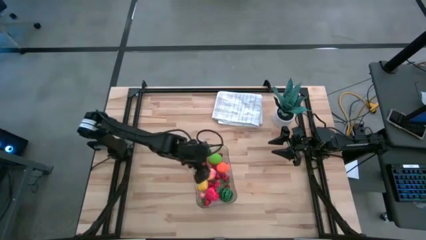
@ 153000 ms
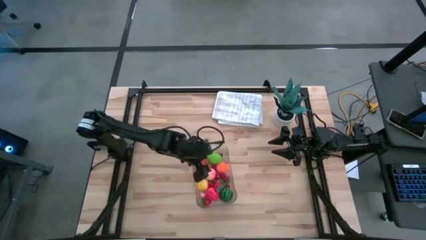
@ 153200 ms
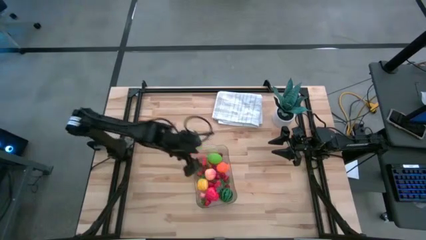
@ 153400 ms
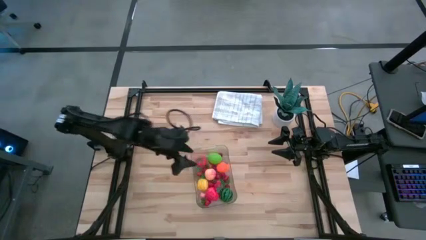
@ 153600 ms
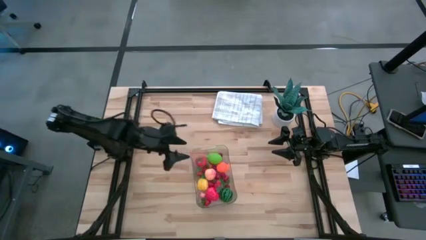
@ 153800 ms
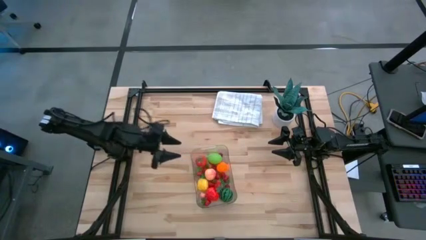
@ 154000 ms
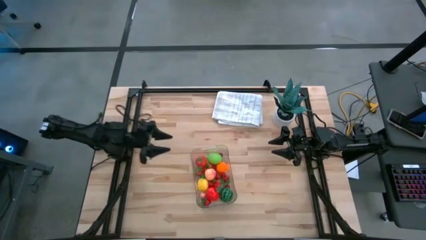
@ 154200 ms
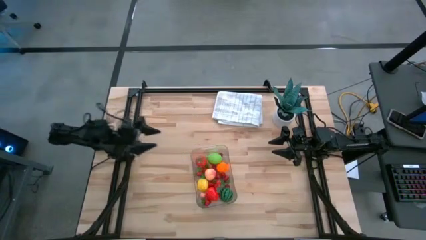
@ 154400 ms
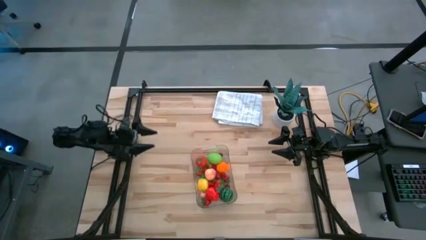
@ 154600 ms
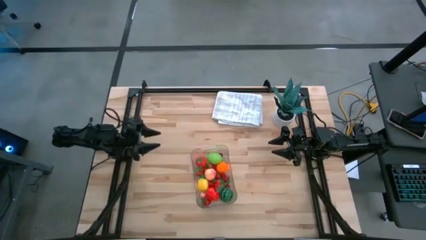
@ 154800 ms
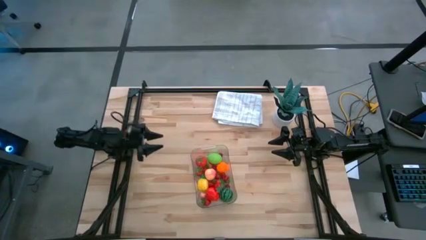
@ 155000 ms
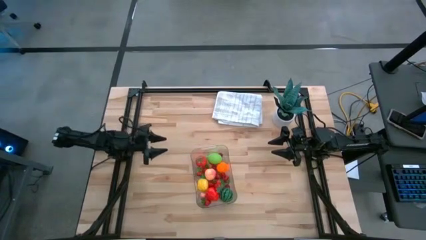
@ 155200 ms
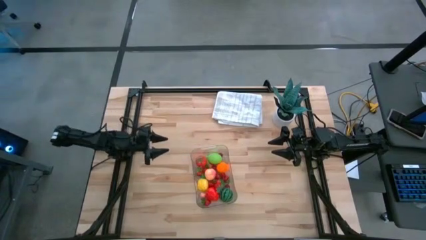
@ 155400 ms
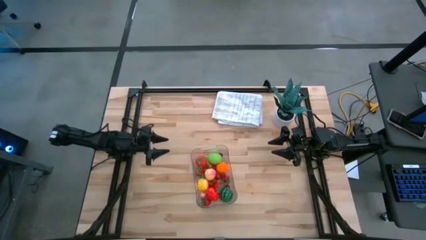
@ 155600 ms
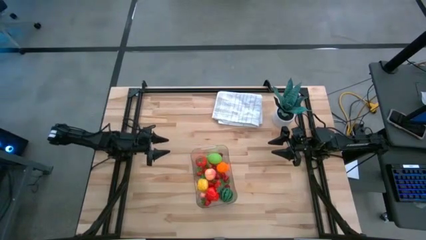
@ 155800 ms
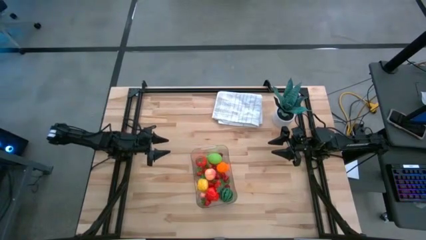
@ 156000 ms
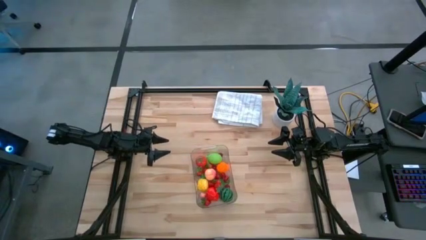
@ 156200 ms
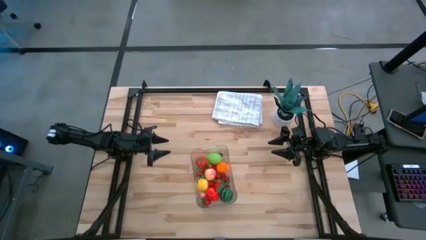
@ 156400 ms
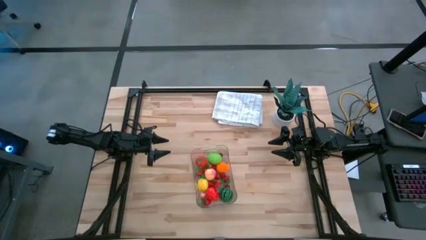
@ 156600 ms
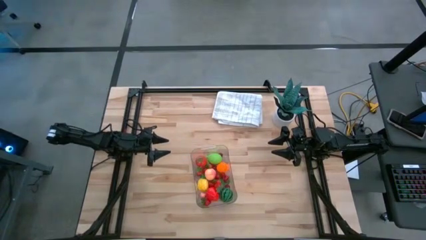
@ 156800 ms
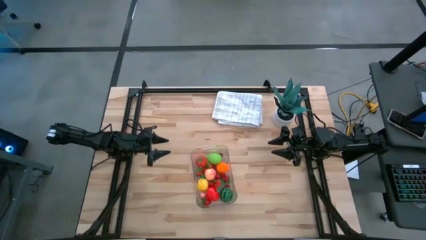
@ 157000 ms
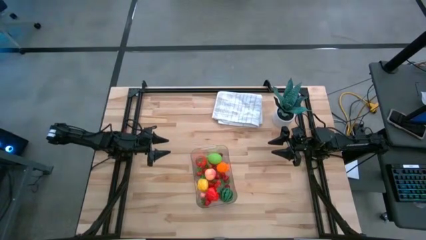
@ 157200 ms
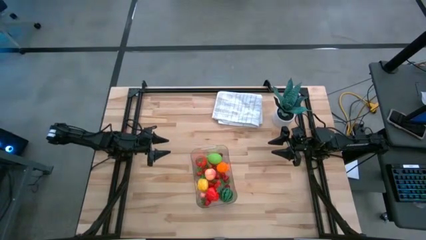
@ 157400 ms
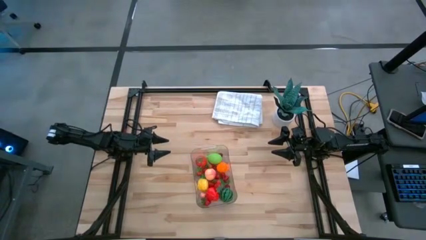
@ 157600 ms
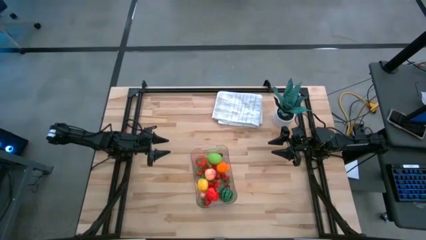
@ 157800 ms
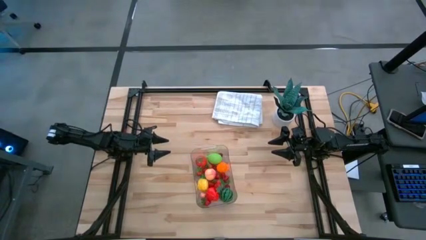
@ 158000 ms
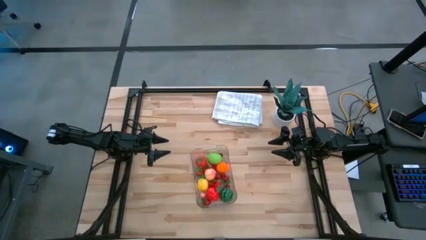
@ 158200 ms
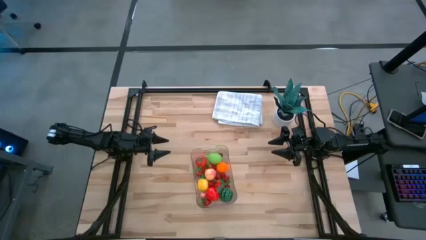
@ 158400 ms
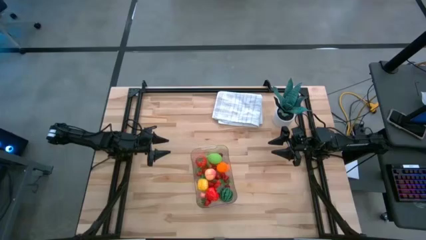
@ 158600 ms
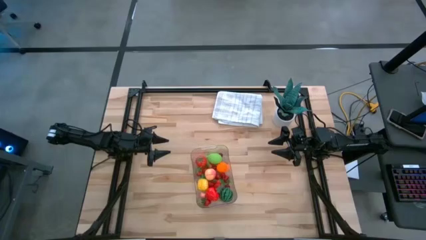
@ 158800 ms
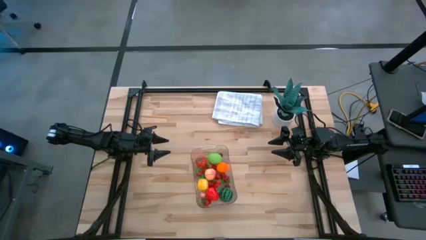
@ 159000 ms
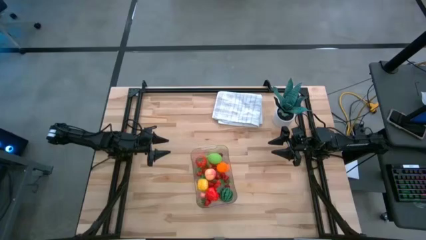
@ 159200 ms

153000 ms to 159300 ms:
Task: Pick and placing Produce into tupperware
Return to Home Position

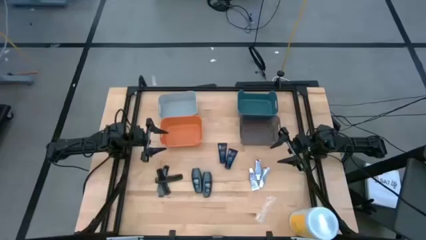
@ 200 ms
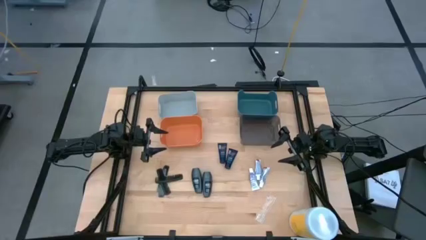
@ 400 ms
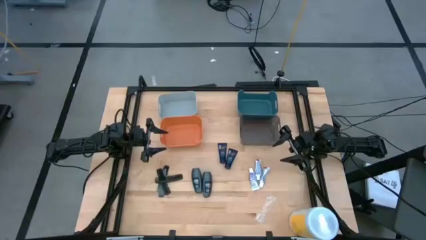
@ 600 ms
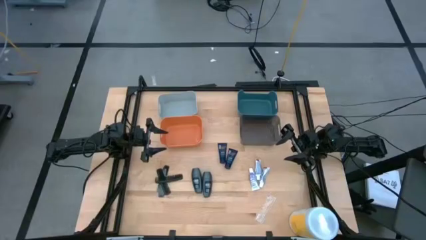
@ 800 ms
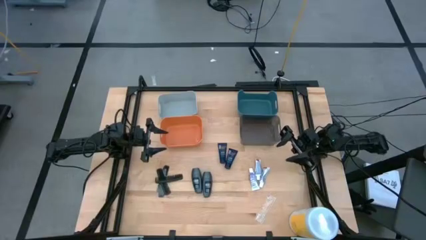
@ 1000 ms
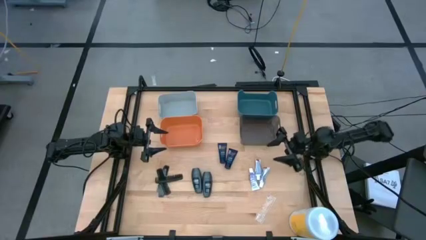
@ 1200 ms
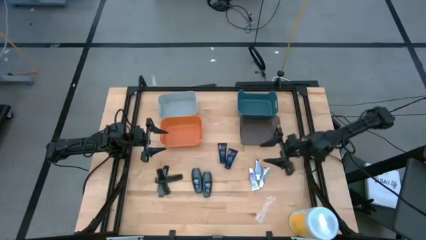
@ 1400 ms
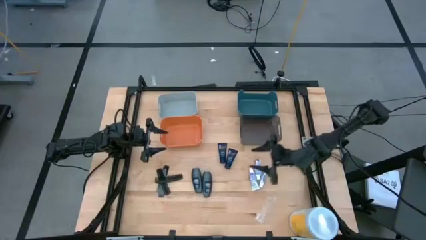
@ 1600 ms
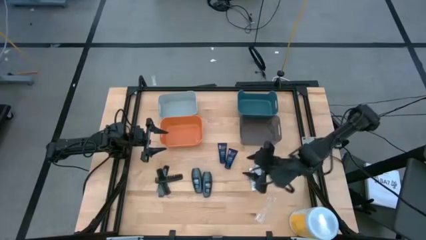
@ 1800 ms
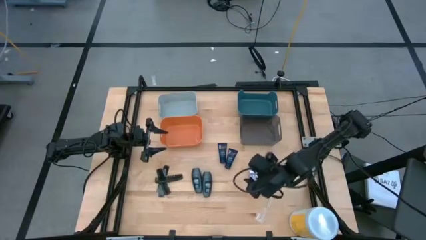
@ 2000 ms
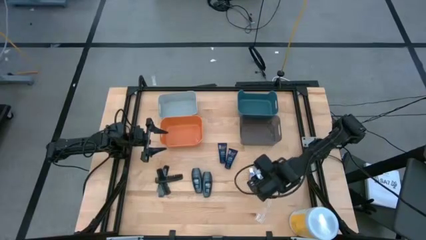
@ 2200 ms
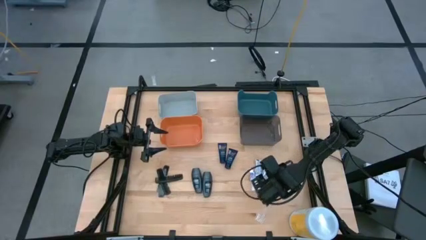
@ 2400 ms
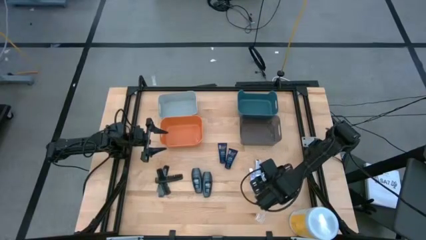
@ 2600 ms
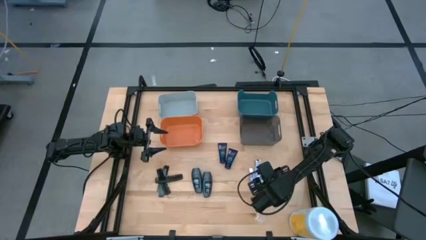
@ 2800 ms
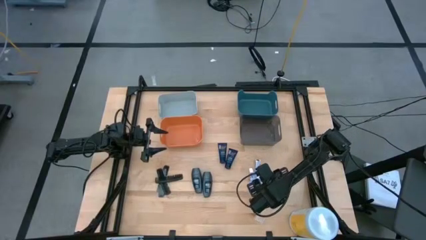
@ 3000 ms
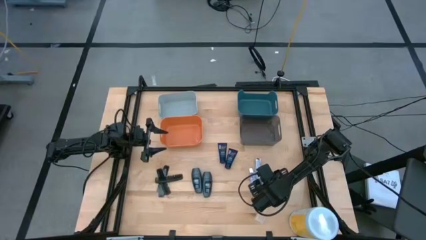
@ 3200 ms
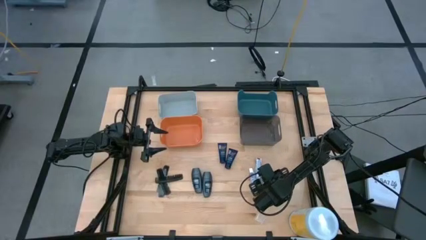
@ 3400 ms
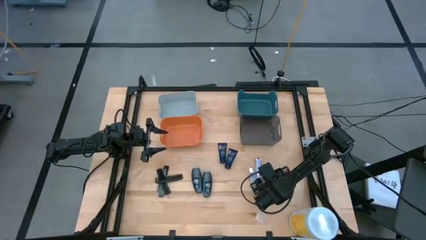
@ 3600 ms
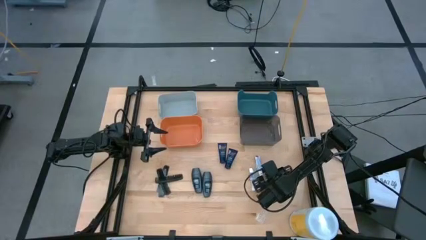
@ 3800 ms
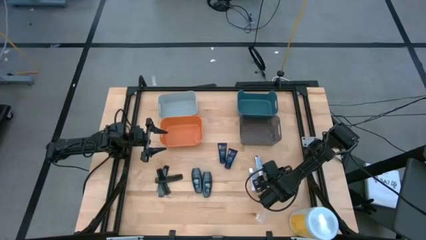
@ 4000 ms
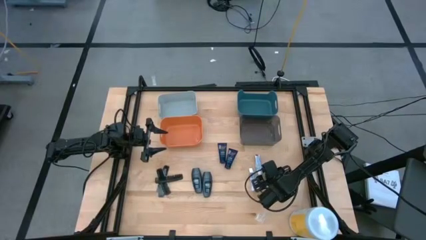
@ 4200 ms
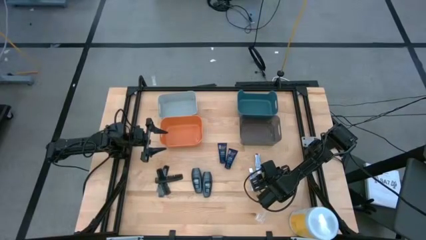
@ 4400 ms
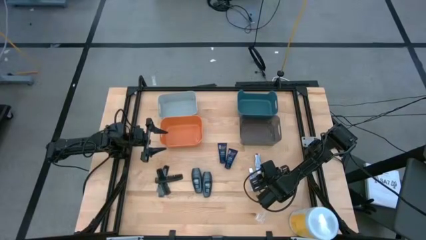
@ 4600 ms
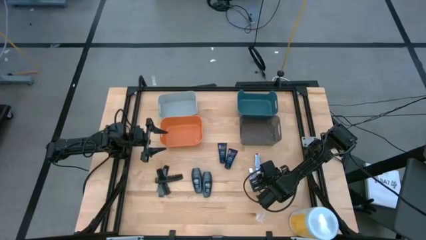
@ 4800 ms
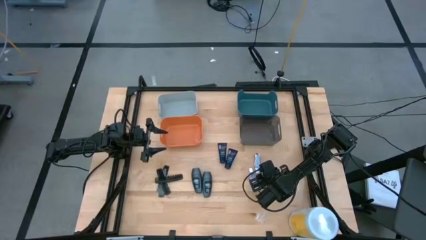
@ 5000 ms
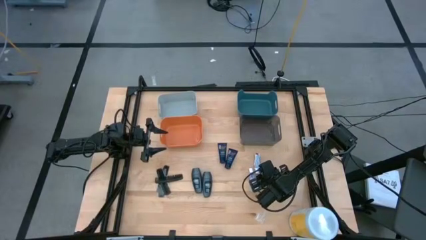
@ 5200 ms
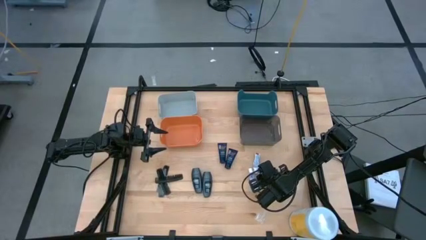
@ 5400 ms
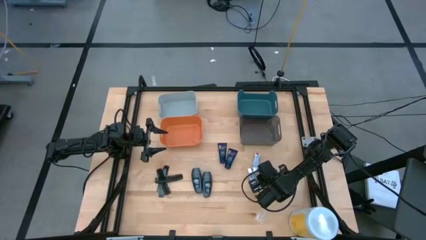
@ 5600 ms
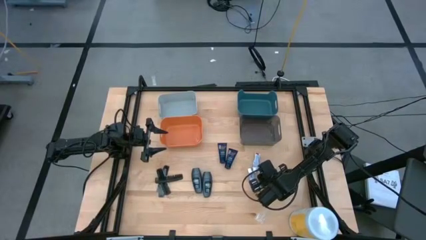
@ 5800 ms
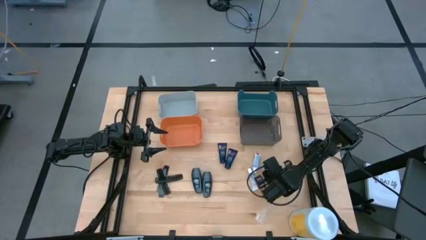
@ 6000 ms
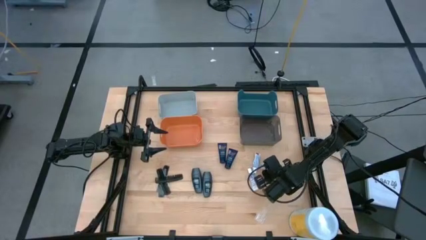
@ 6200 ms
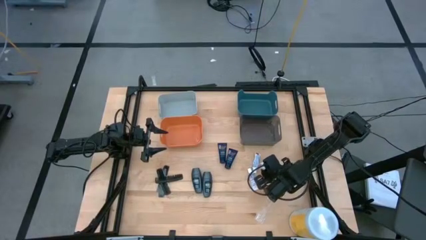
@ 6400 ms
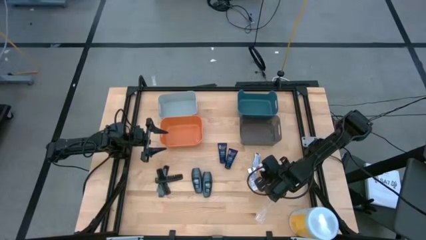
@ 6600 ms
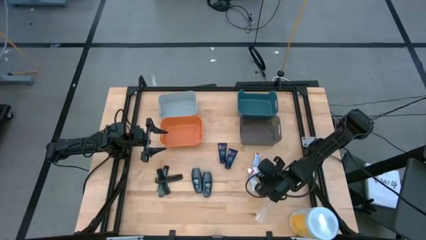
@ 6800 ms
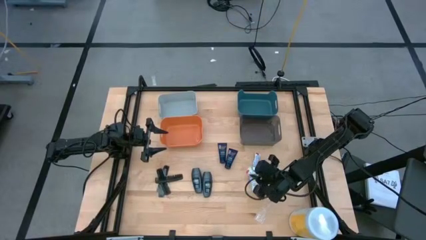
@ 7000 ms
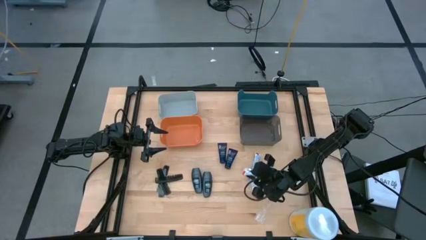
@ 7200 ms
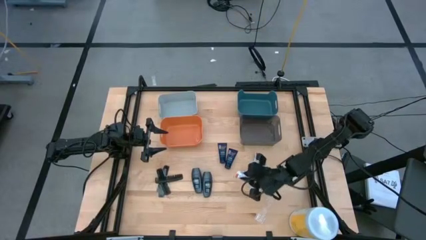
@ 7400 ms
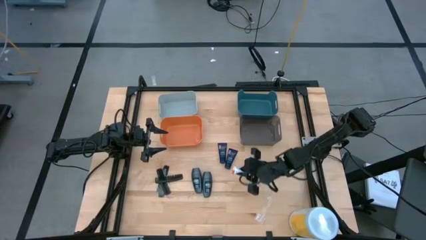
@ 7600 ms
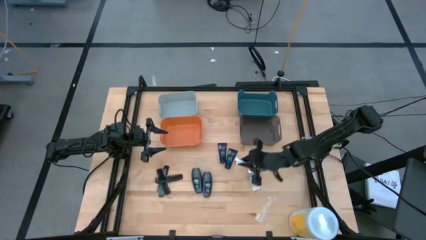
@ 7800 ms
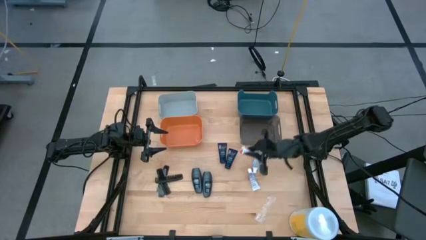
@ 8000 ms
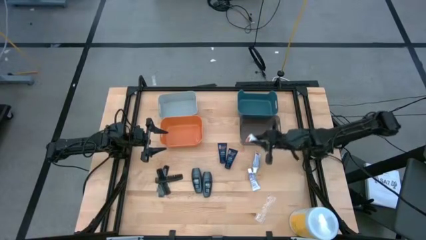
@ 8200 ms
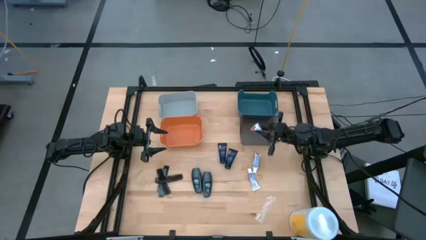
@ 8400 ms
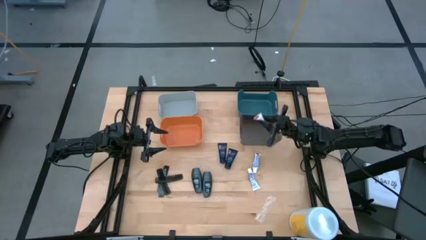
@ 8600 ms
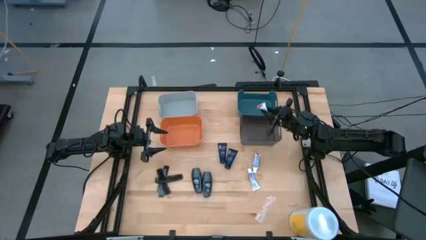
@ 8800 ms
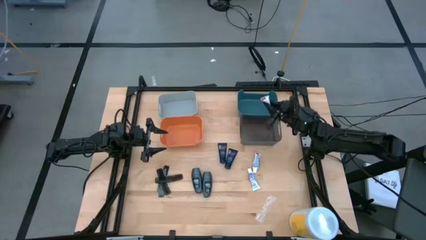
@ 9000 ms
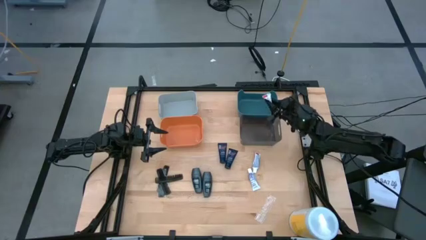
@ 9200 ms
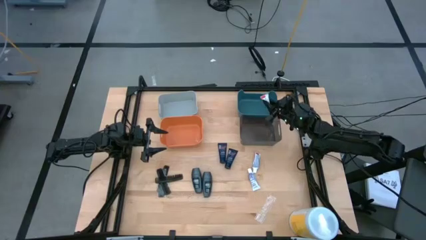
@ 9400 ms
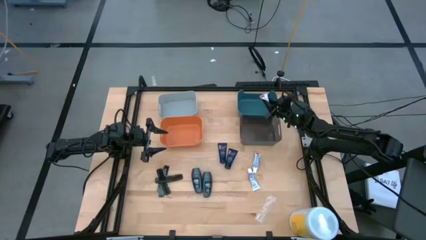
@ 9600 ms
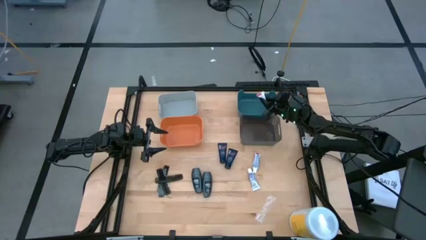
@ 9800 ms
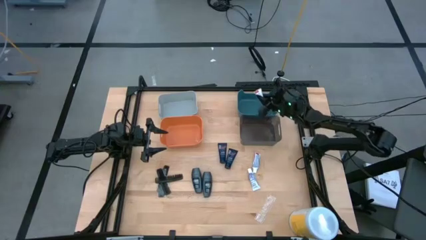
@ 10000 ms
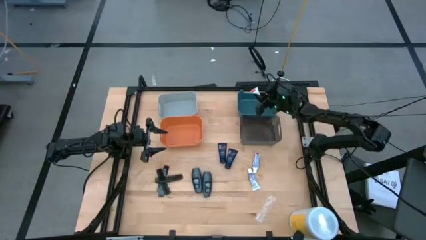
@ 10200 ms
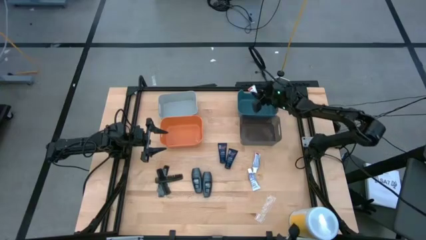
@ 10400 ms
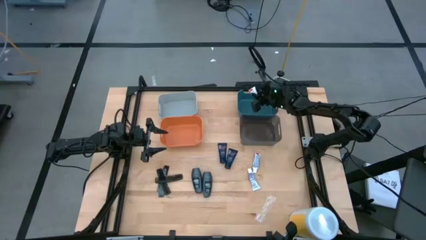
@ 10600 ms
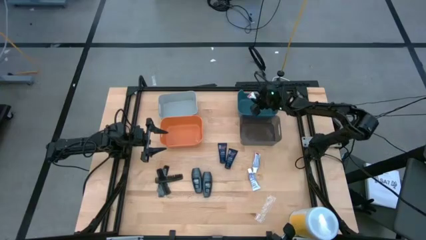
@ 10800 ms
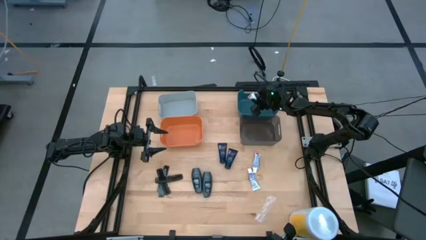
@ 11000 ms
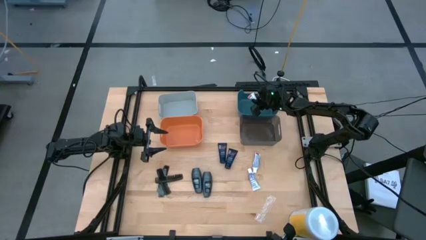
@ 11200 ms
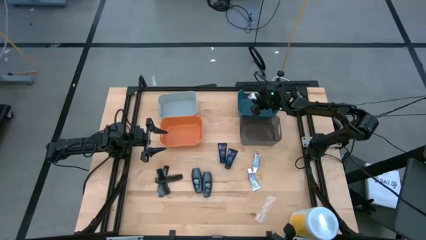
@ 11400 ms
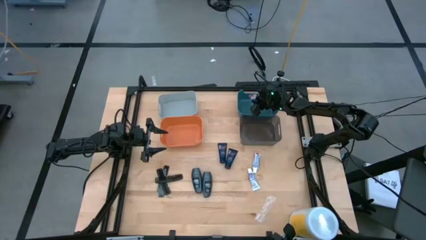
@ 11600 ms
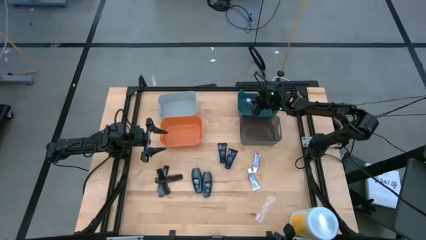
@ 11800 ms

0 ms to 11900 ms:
Task: Pick & Place Travel size toiletries
Put the white toothpaste into the blue bin
